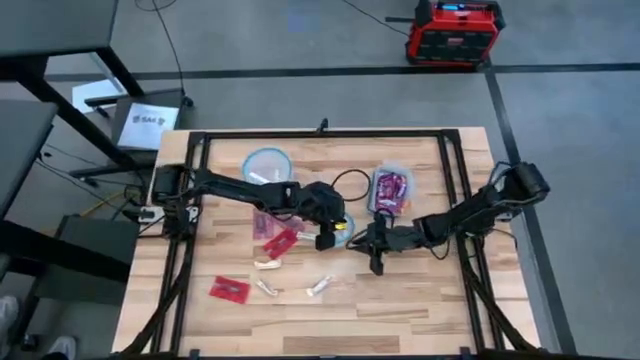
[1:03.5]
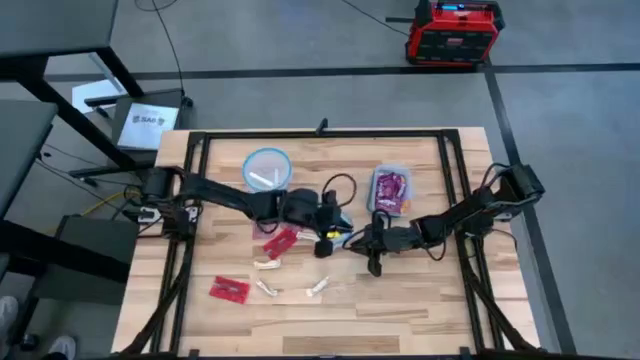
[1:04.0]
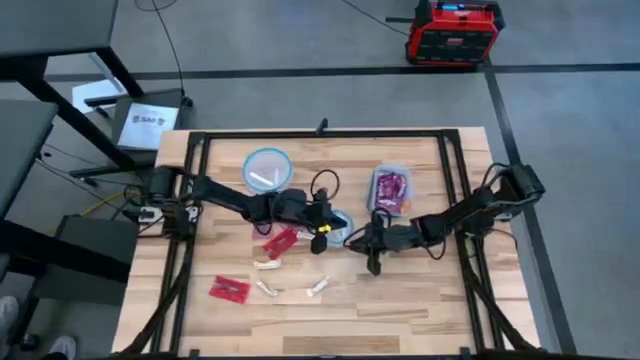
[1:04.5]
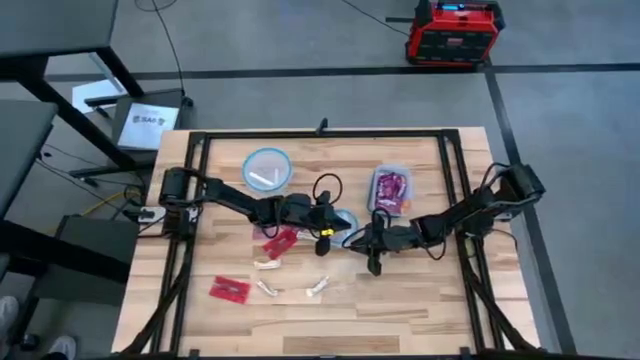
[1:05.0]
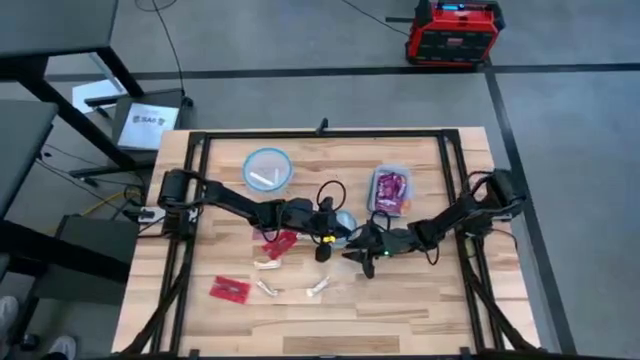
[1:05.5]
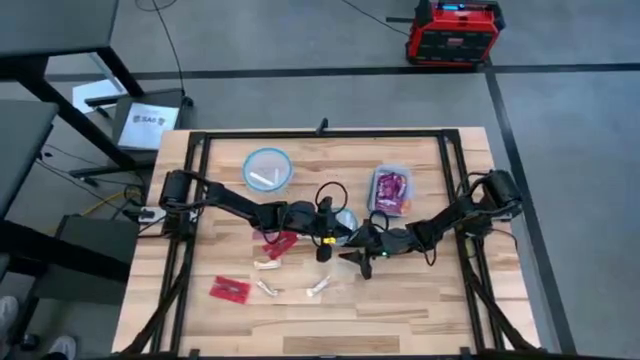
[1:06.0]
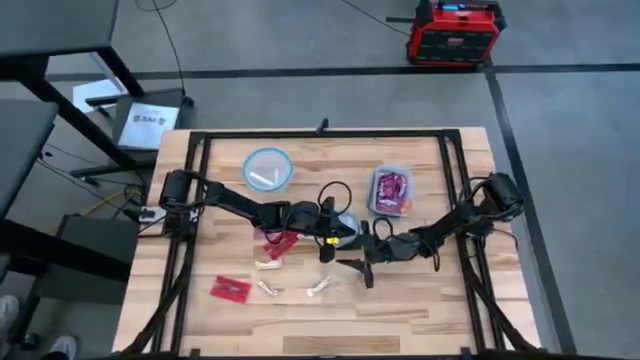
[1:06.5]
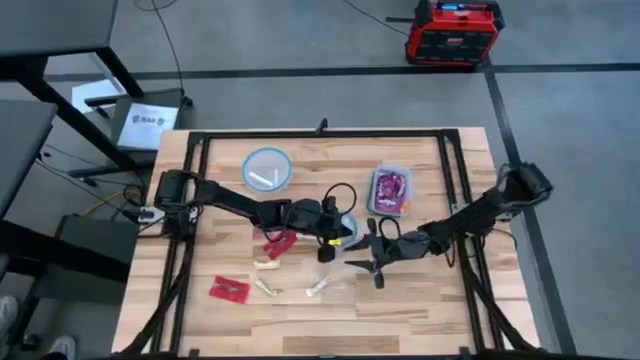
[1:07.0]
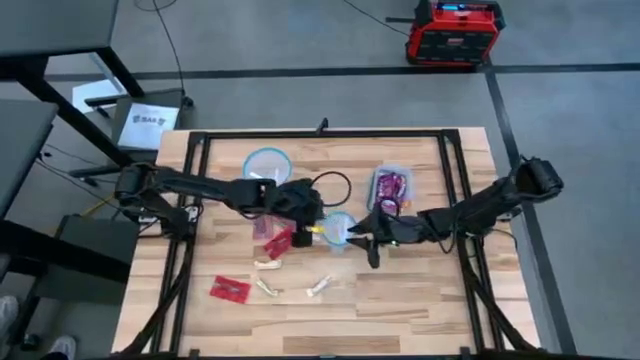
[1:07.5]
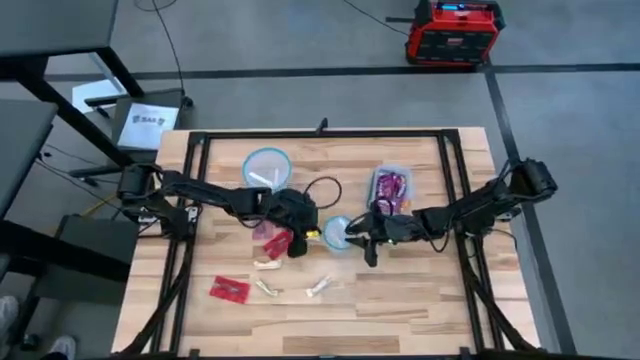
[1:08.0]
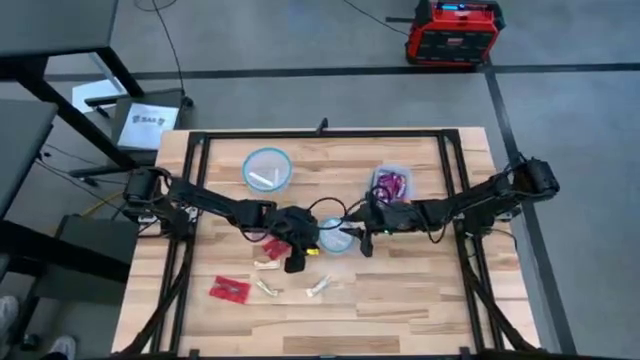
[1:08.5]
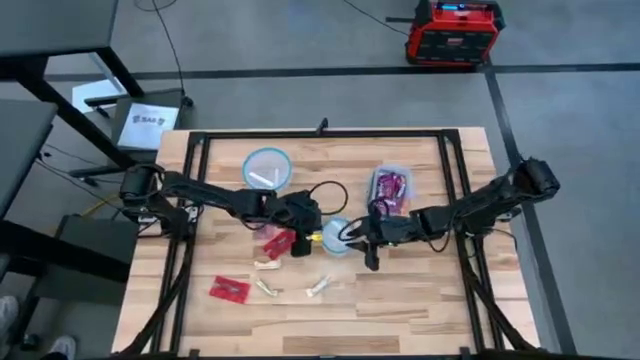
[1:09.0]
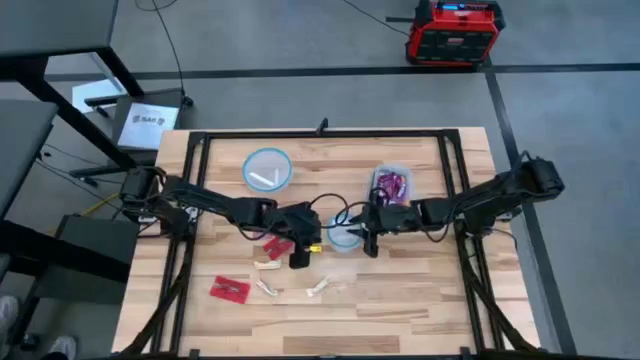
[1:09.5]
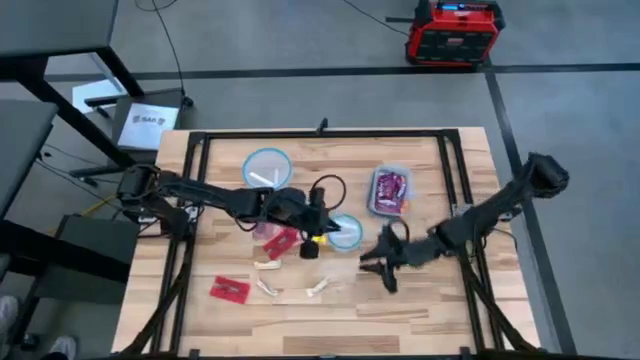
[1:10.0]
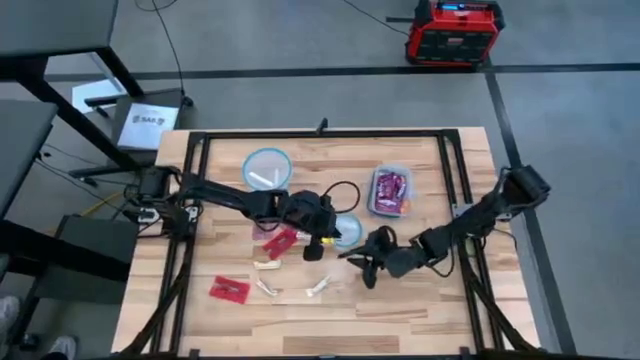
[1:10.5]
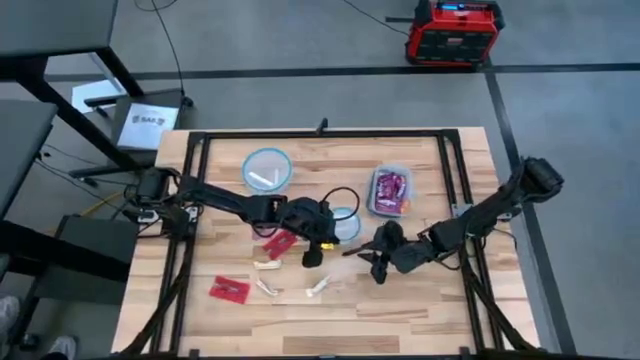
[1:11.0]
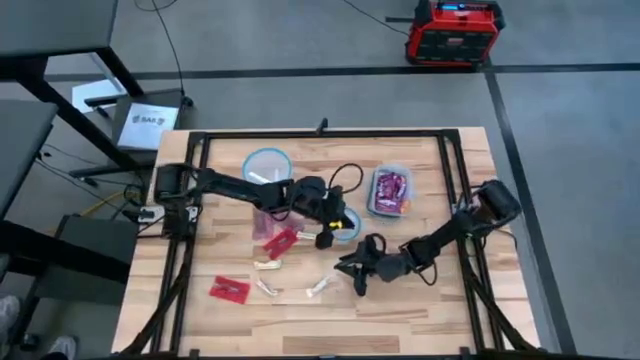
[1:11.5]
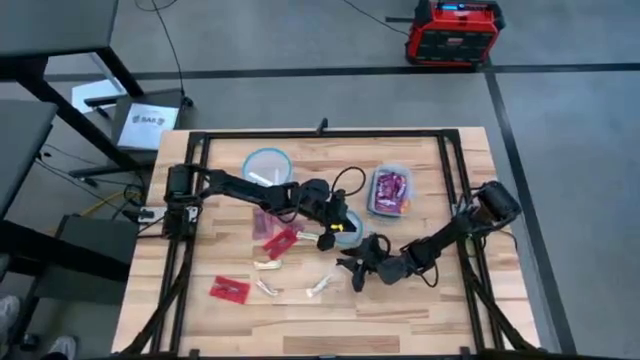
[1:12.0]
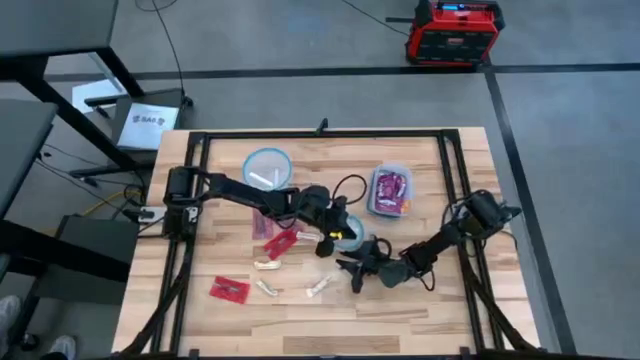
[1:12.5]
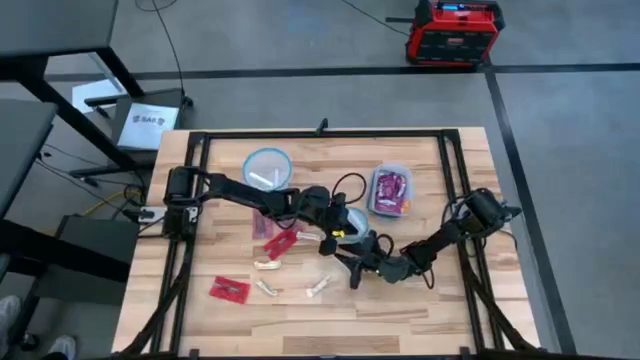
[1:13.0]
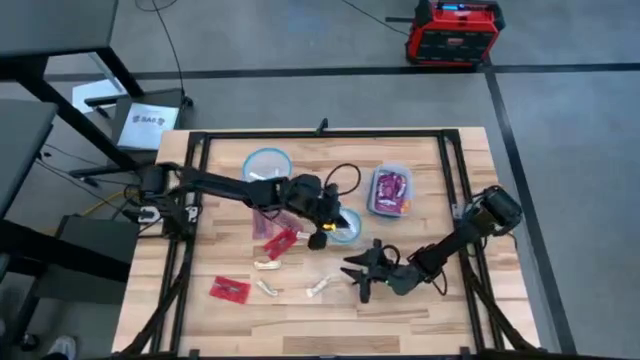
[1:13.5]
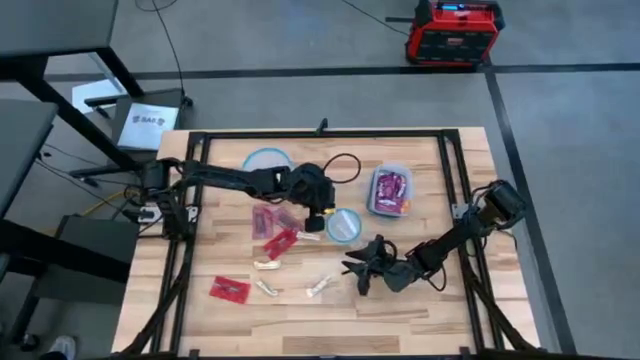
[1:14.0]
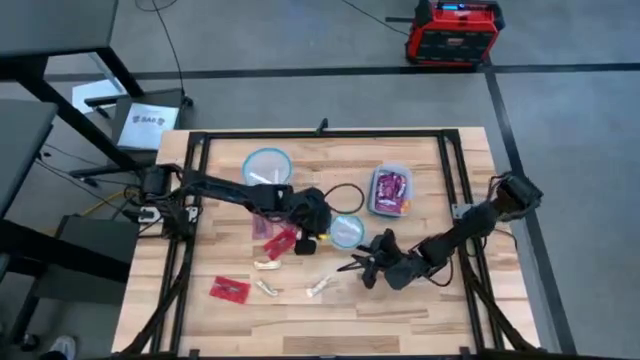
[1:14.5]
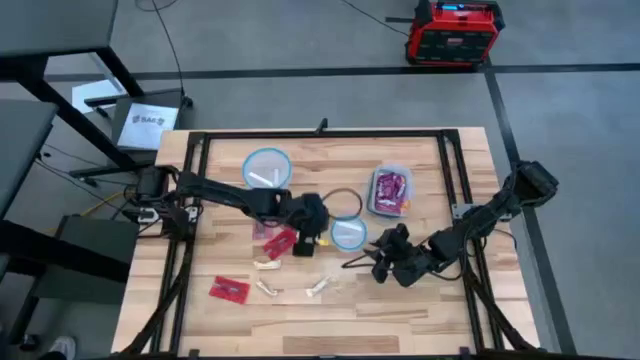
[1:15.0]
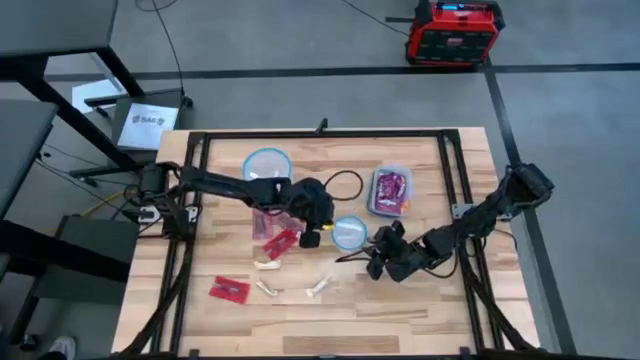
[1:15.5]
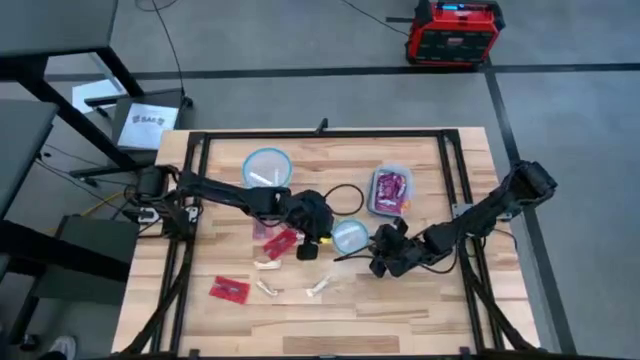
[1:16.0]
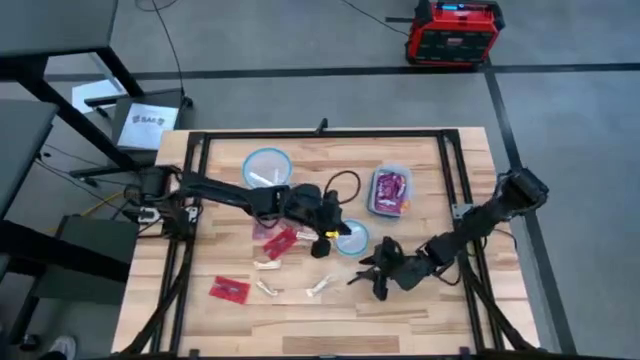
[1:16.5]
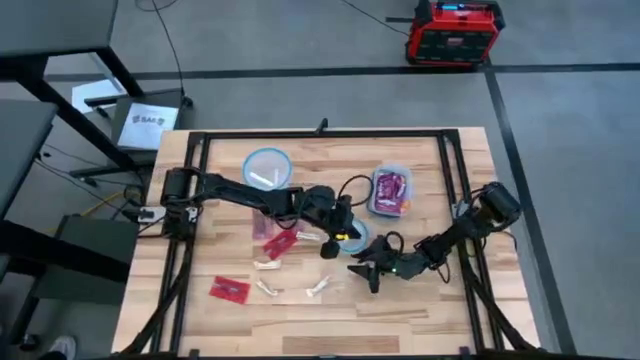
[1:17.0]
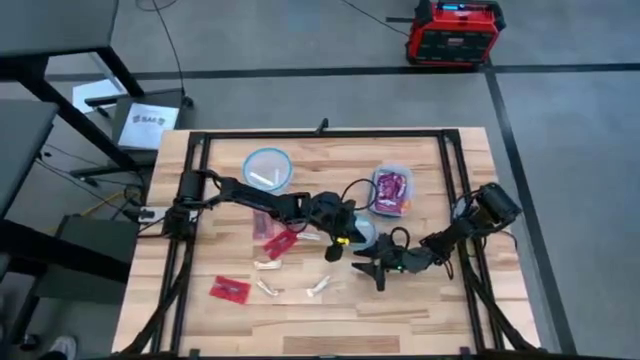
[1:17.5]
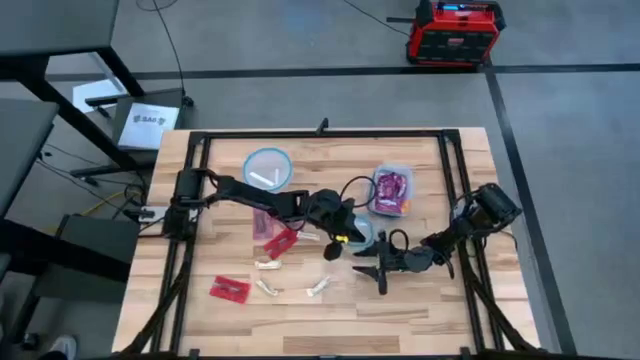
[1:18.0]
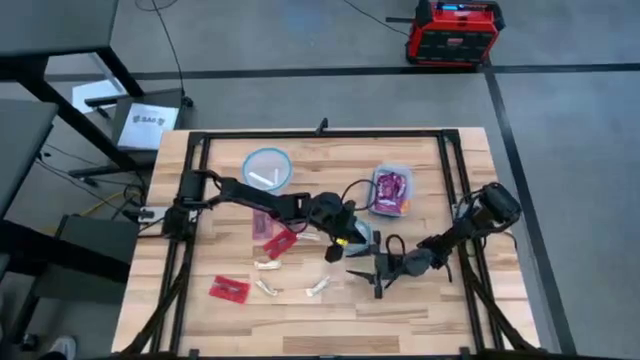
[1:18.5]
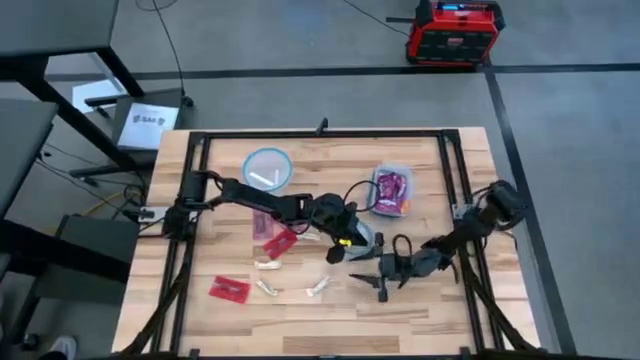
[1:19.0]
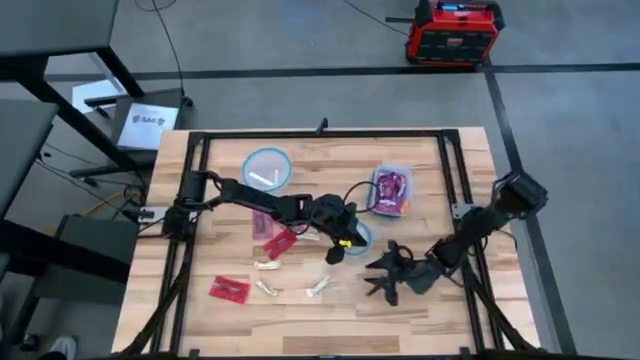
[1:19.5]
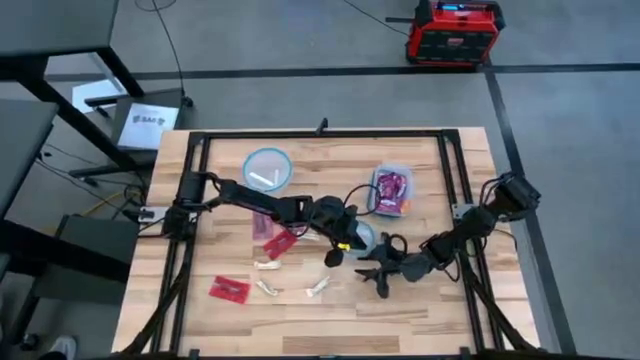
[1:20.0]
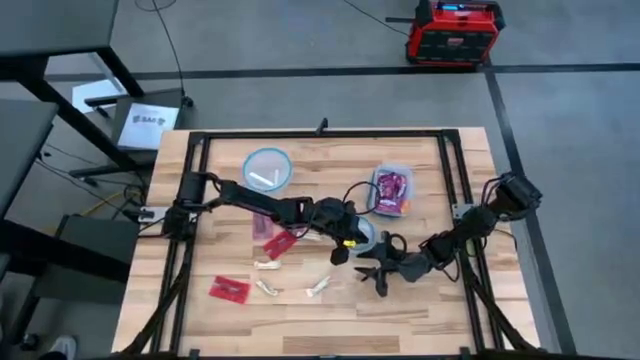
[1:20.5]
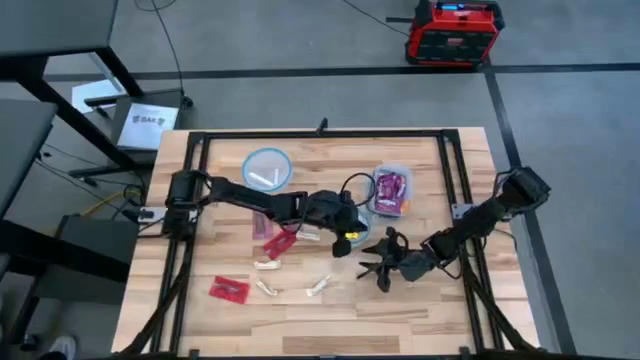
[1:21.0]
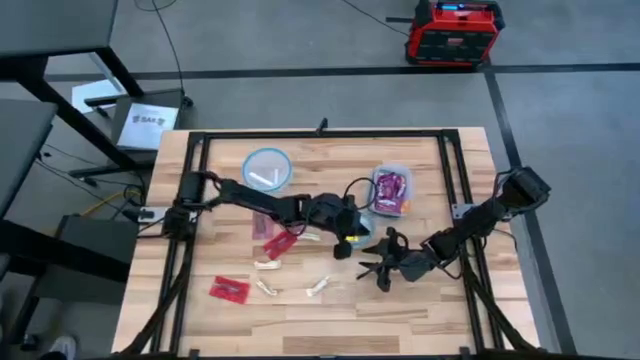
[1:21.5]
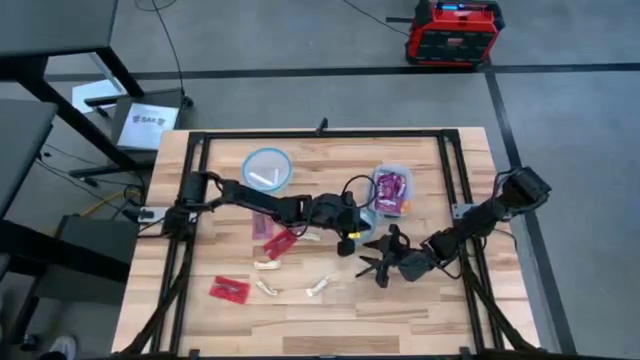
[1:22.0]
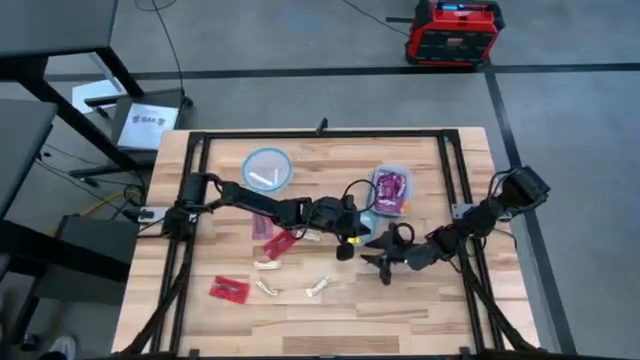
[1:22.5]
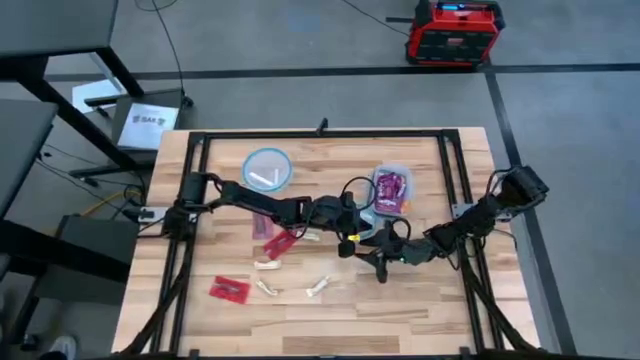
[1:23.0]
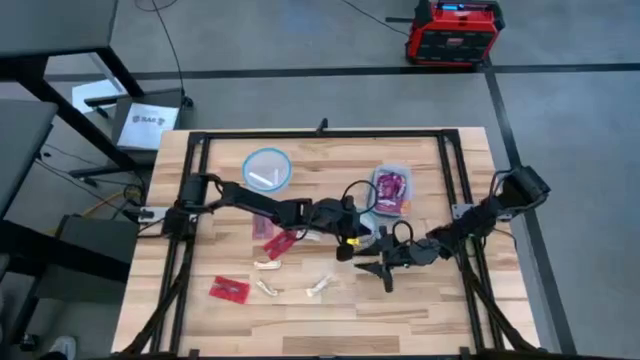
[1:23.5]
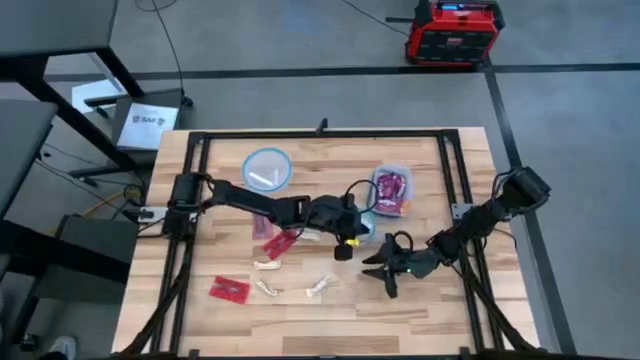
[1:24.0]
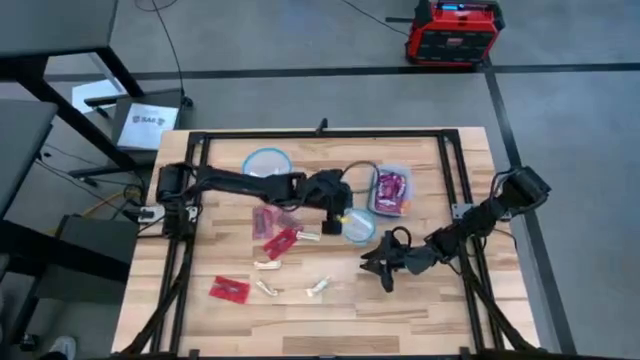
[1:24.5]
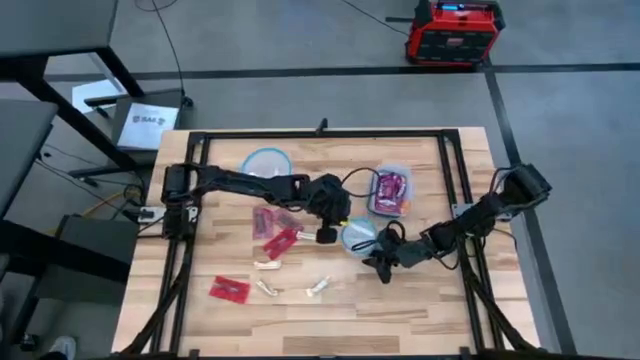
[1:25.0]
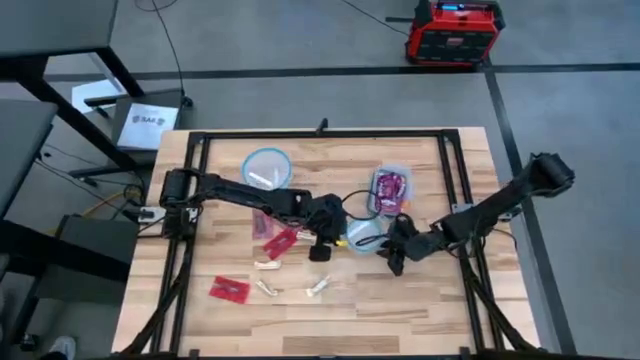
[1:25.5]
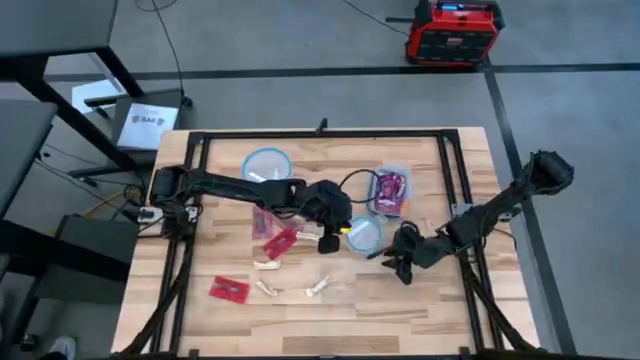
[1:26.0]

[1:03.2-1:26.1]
Task: Sort candy
Open the center transparent bin
